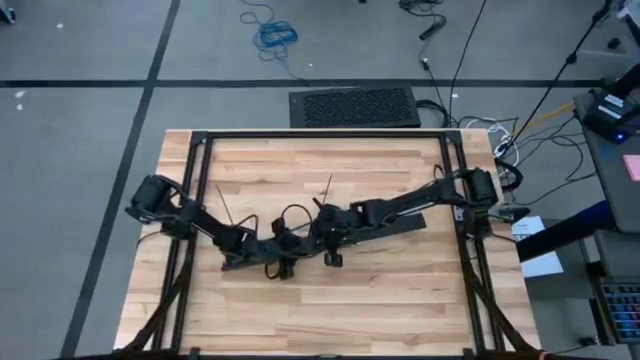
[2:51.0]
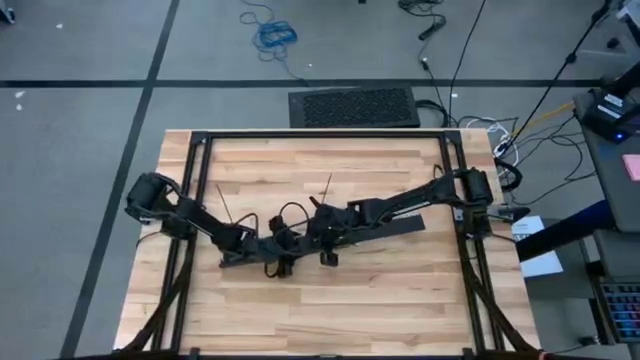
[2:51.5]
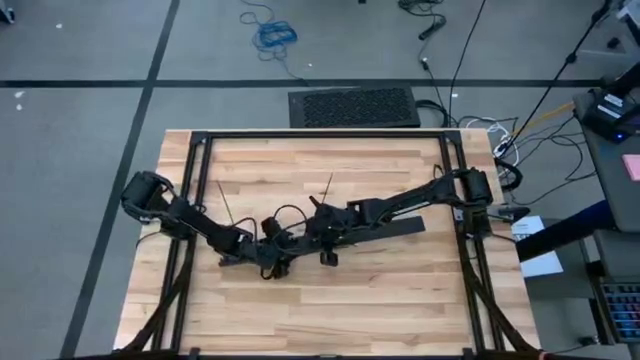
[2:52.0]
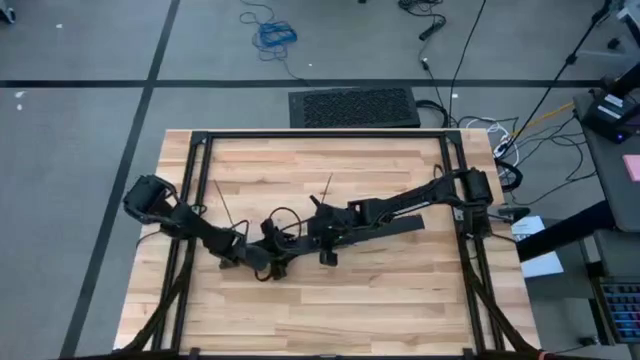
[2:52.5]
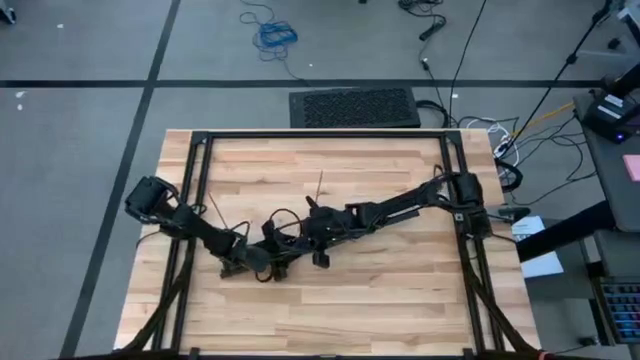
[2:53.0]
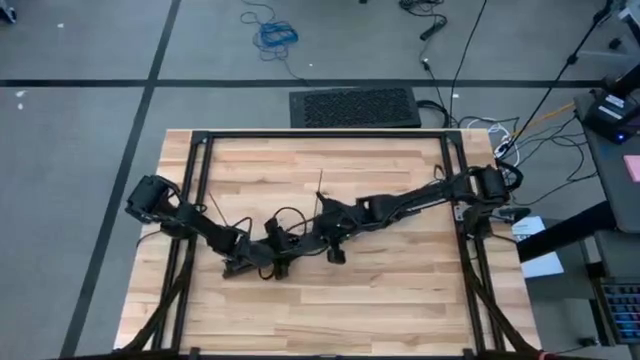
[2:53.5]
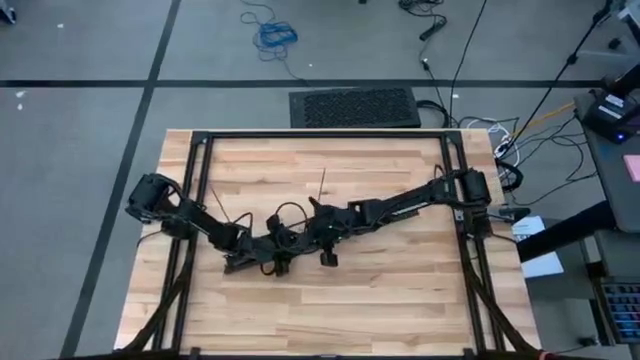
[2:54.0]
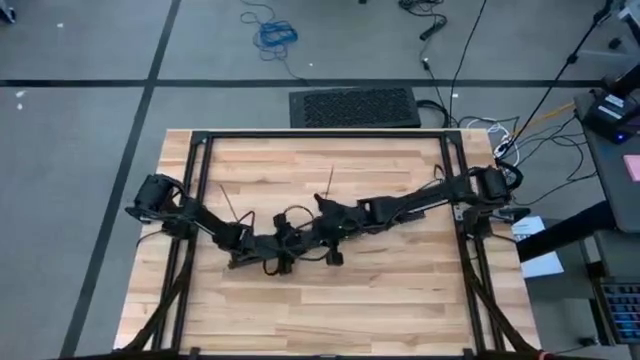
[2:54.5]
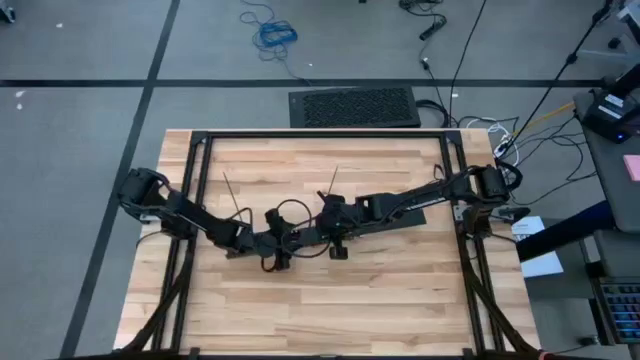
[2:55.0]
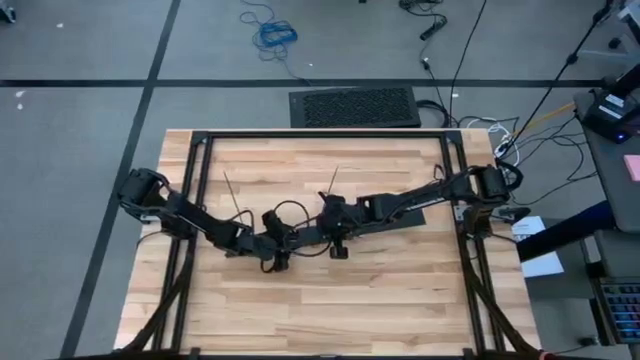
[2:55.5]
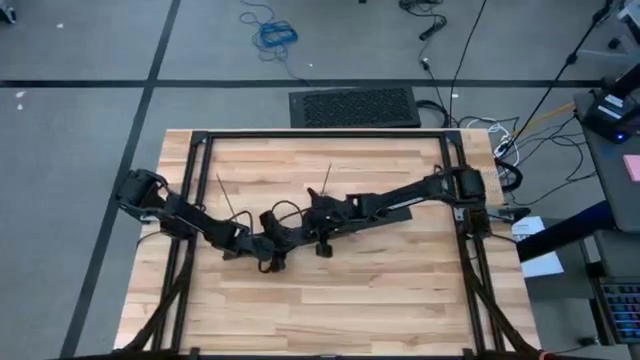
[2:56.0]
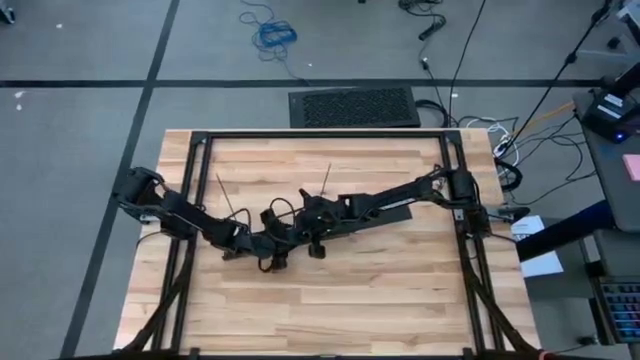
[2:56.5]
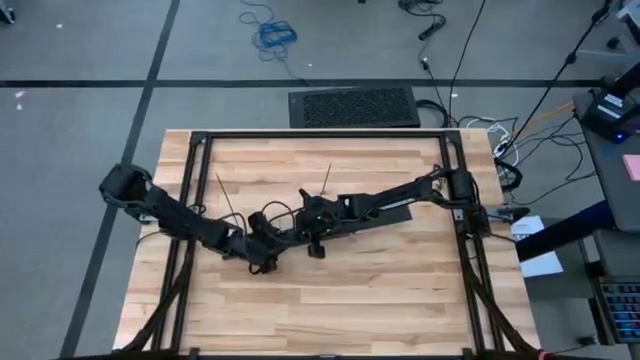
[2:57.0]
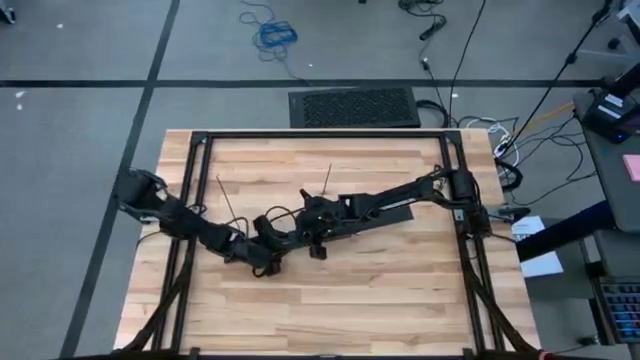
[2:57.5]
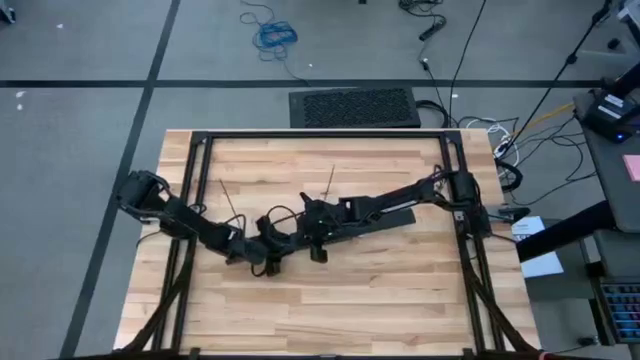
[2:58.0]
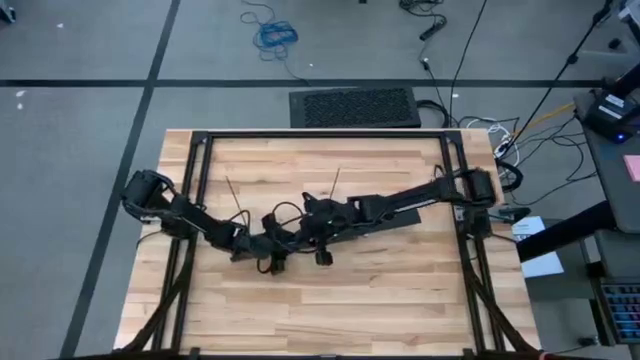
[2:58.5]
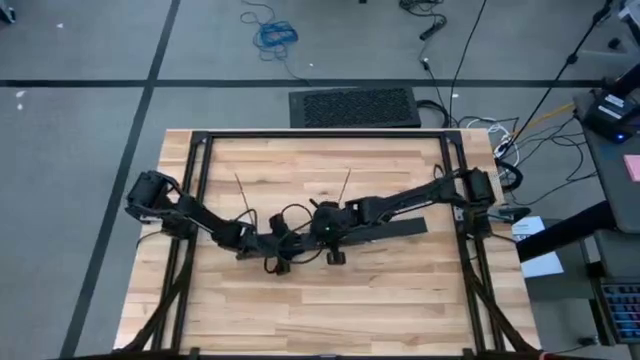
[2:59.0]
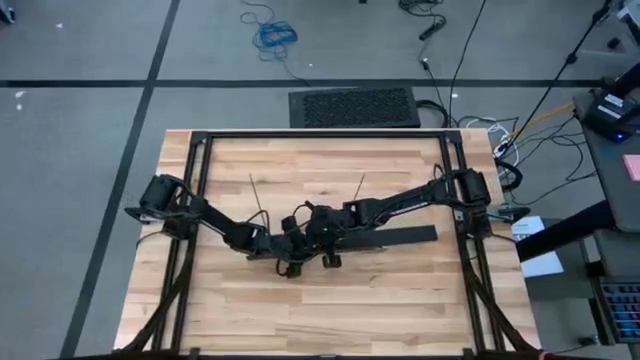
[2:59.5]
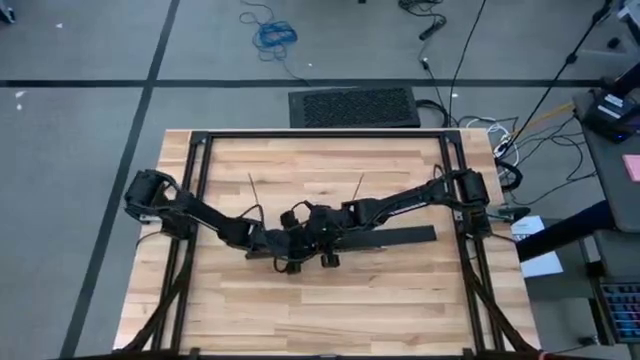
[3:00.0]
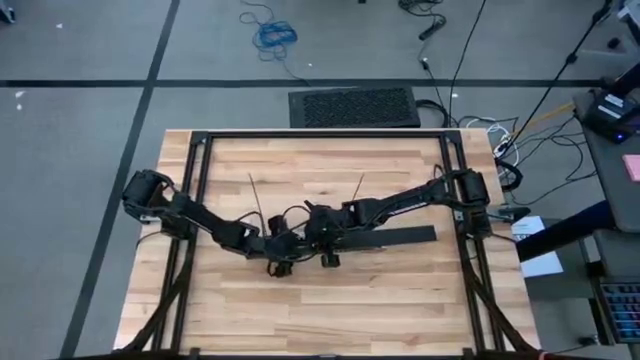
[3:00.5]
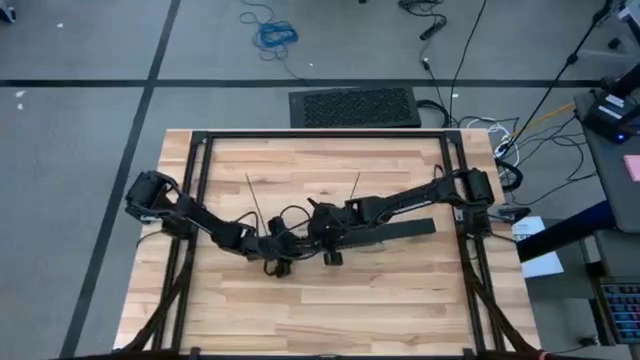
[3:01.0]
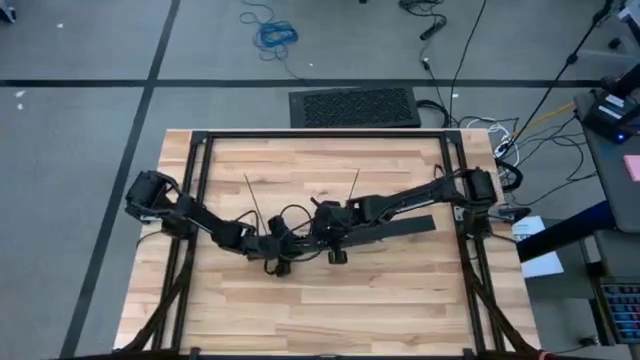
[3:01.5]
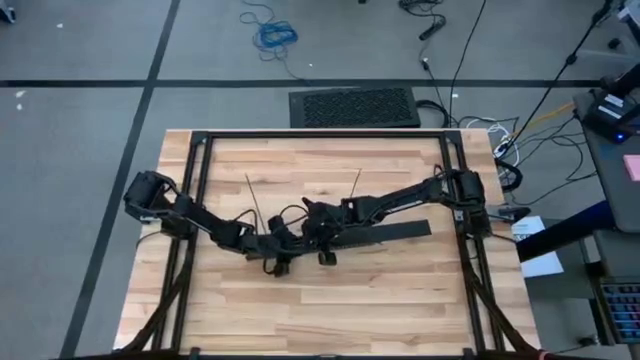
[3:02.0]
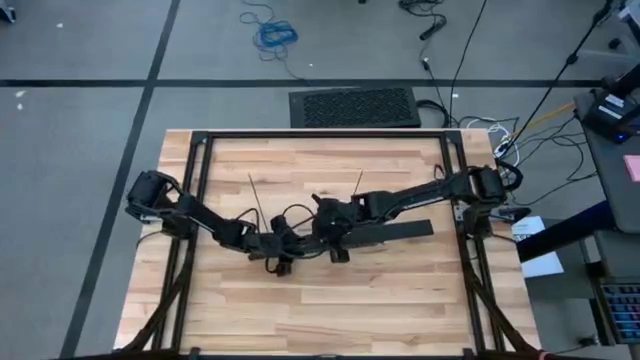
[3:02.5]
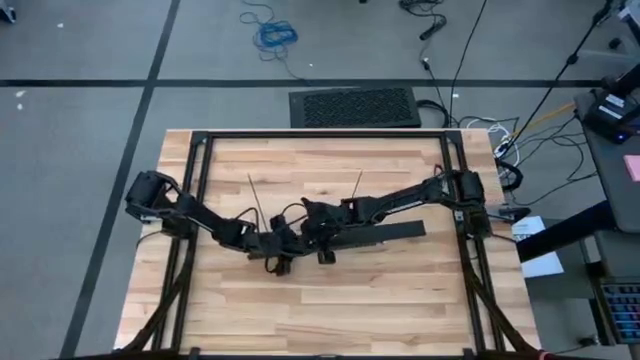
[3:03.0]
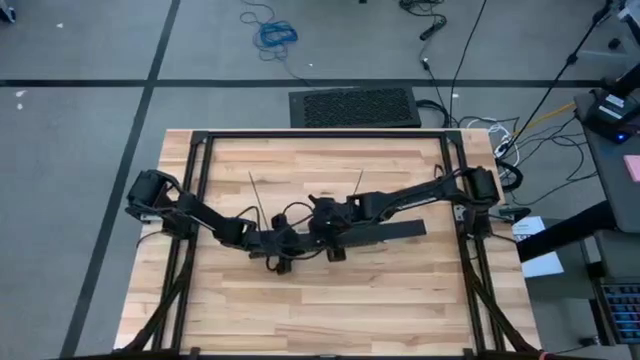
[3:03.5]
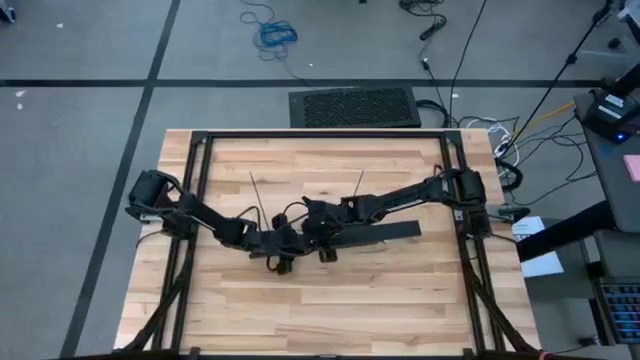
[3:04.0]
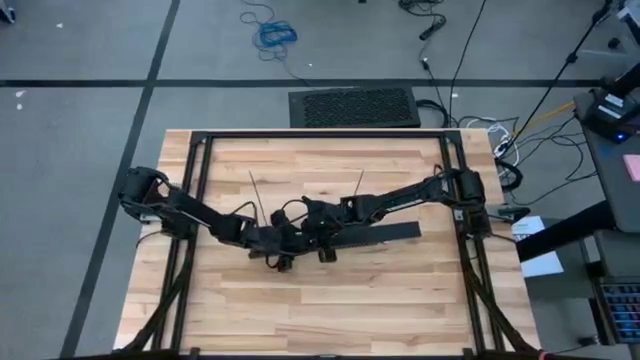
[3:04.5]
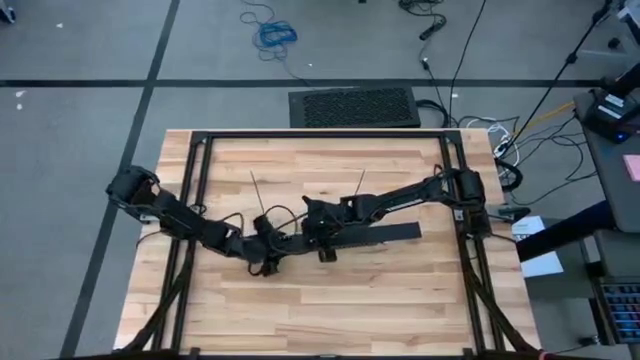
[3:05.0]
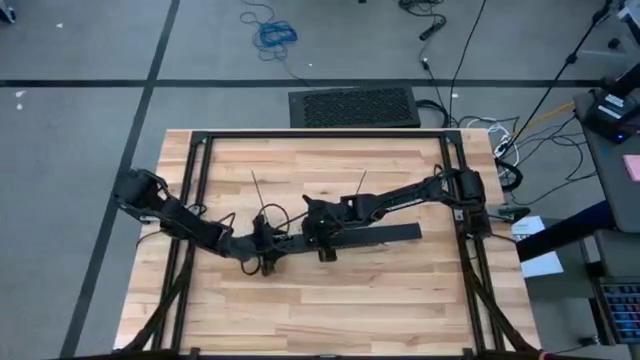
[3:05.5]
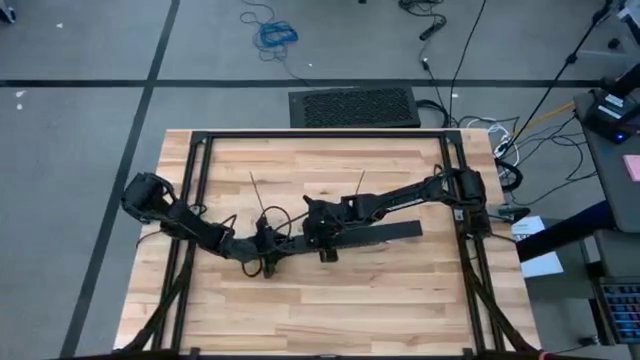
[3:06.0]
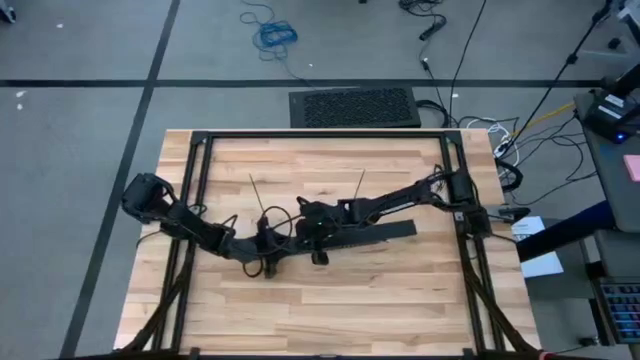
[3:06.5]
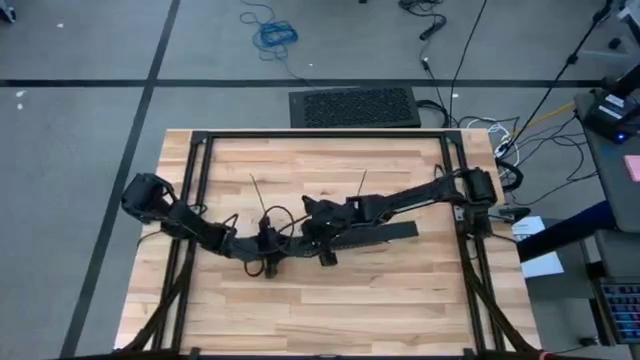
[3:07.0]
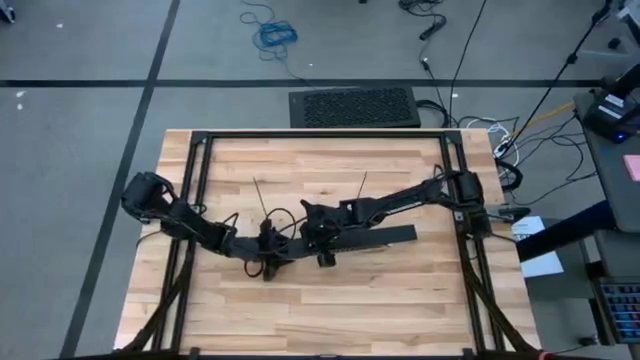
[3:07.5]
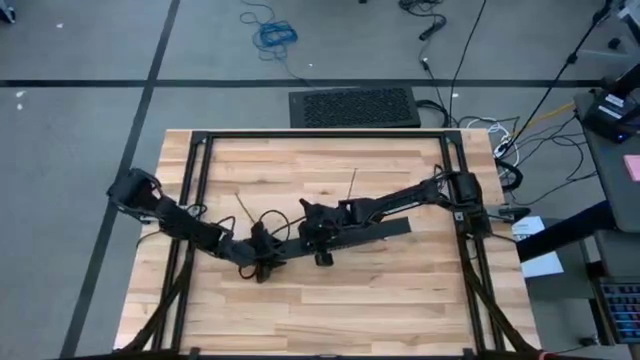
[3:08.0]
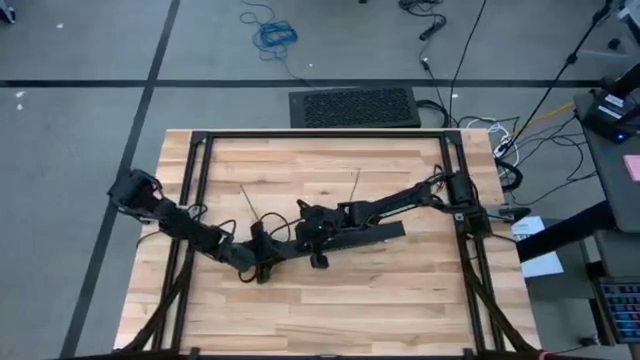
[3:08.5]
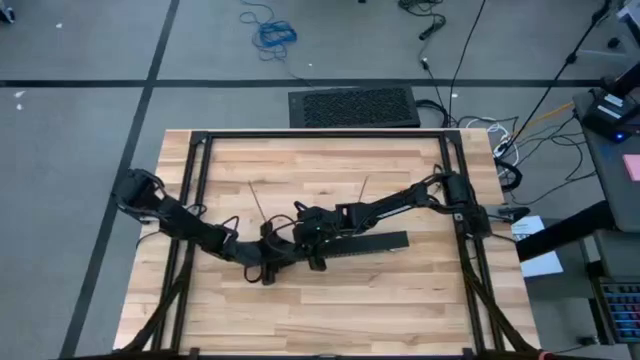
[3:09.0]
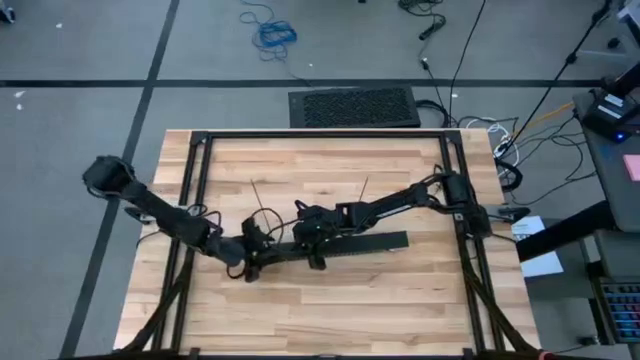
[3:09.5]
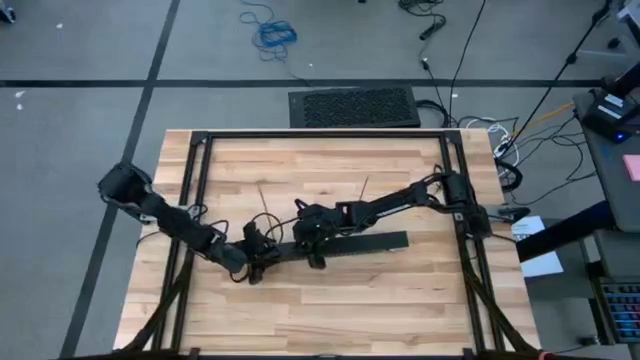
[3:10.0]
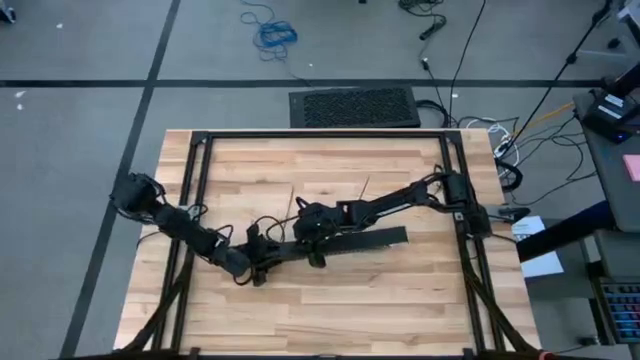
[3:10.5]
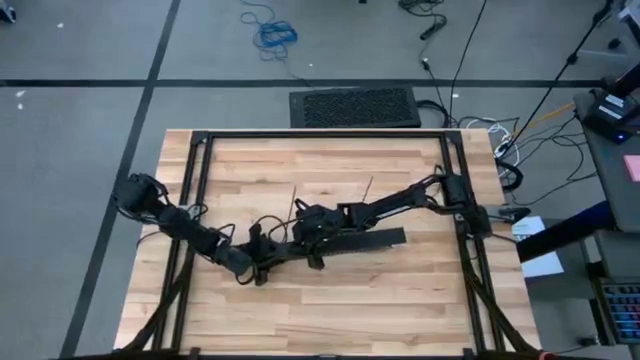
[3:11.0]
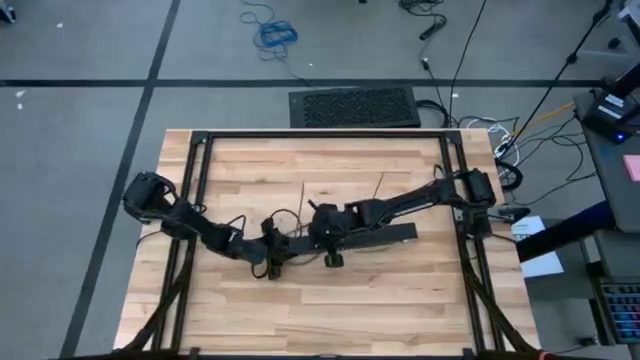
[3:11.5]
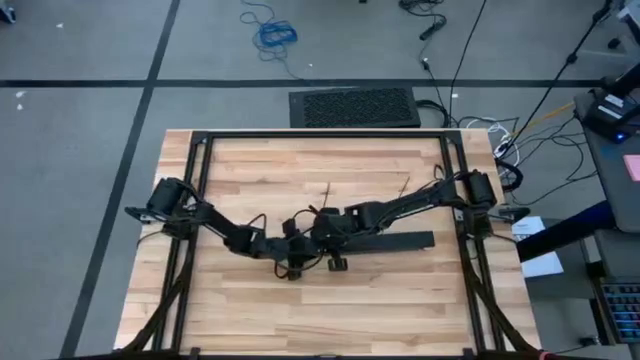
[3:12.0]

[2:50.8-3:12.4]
Task: Ziptie cables
Close the black cable duct
